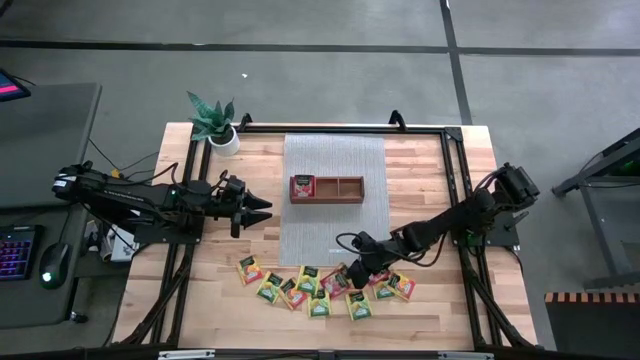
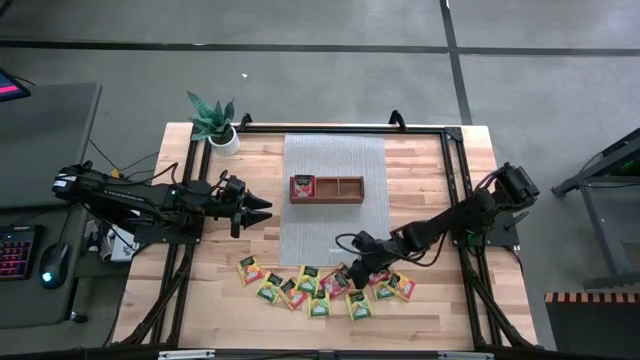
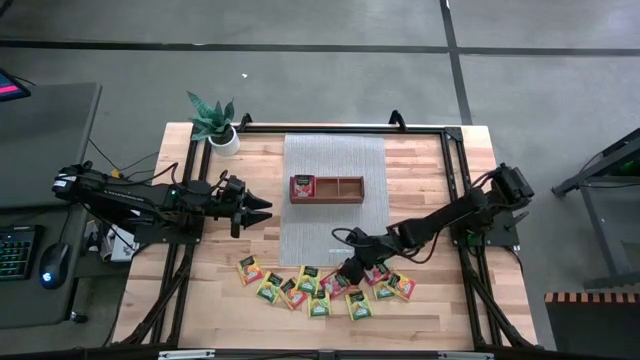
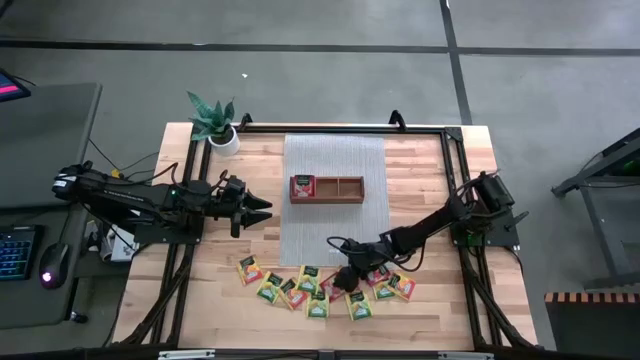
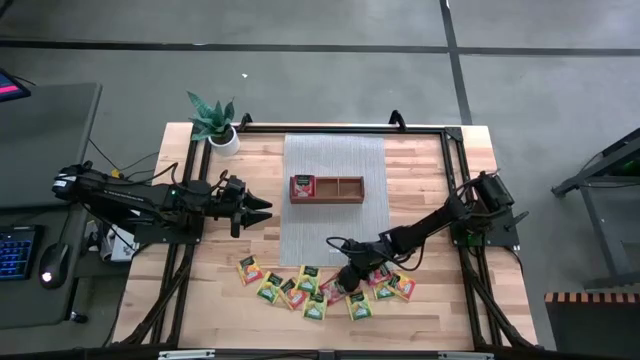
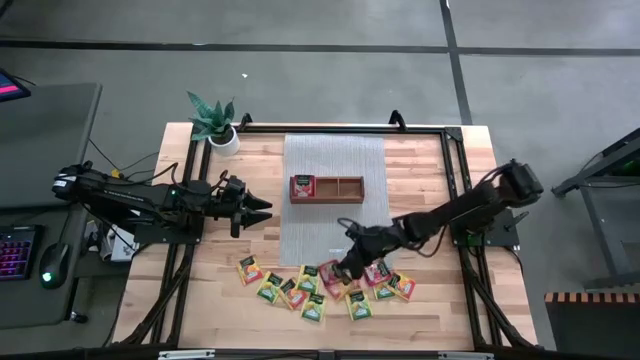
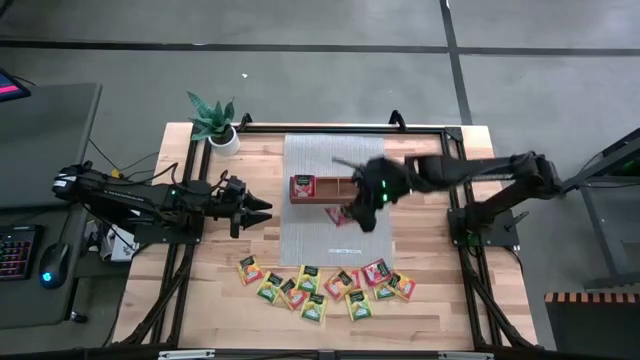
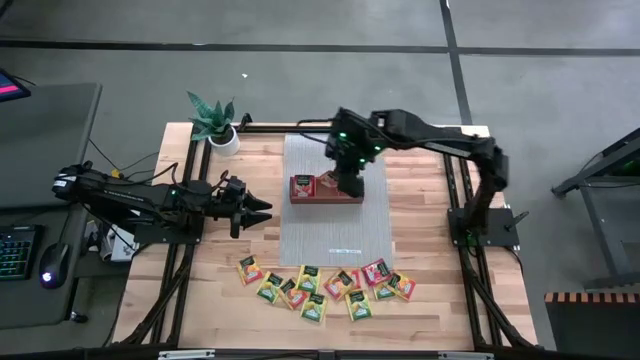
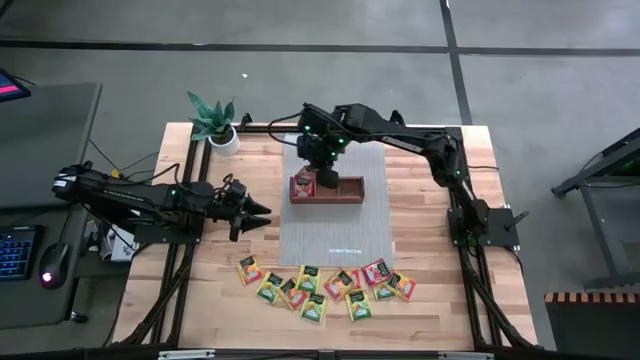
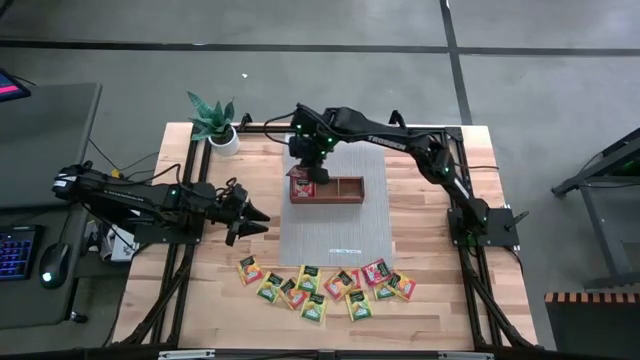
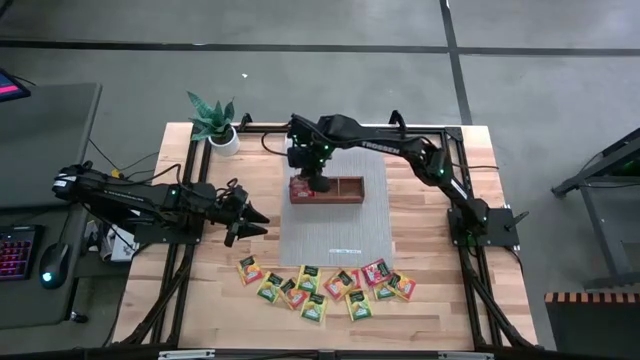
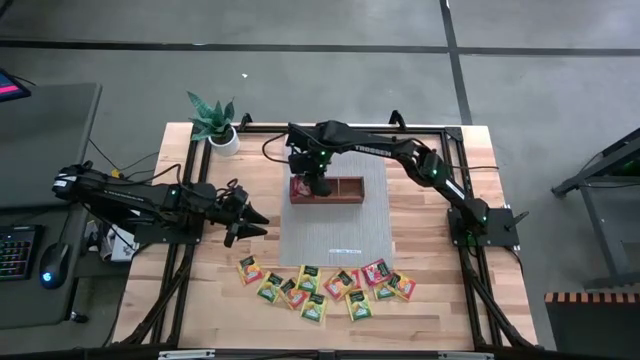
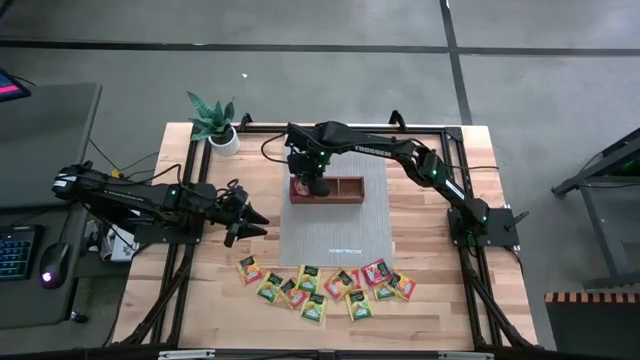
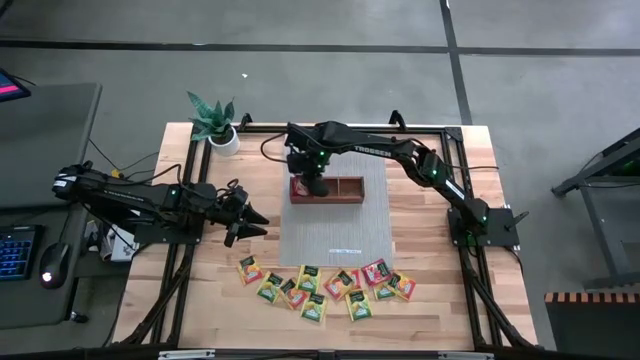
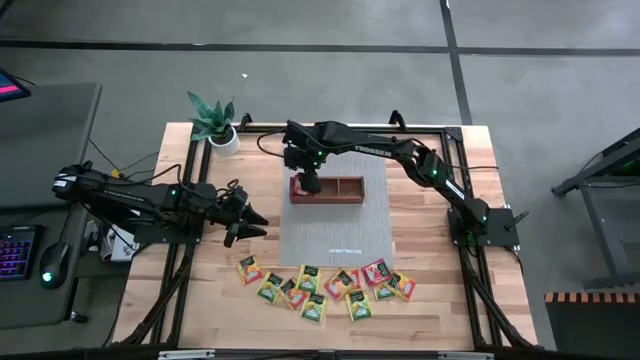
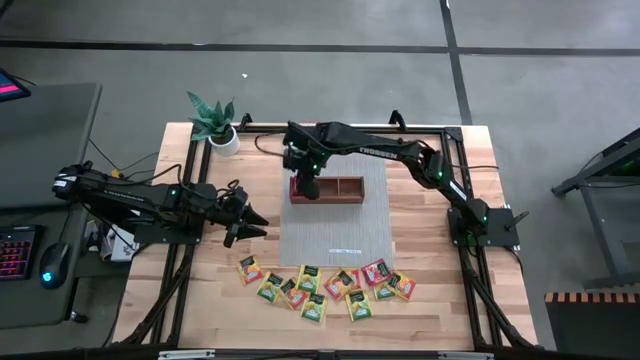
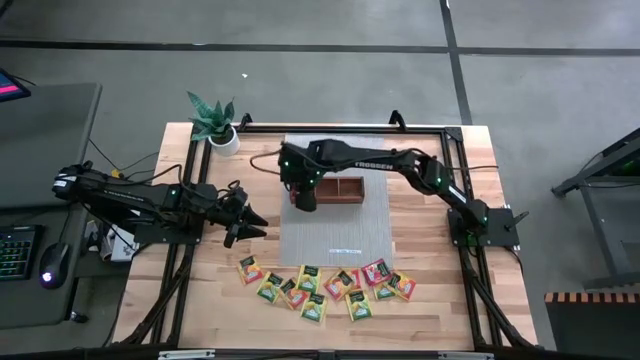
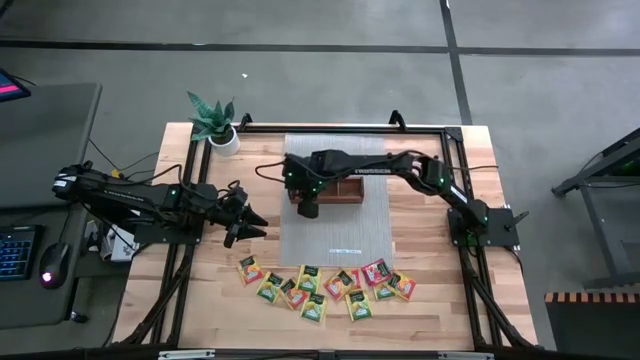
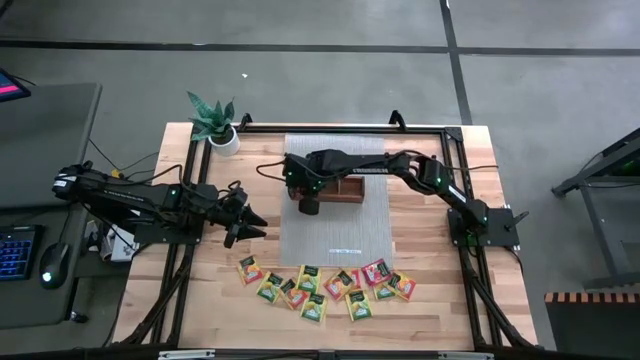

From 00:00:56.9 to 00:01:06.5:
Task: Pick & Place Tea
Put the red tea bag into the left section of the wooden organizer

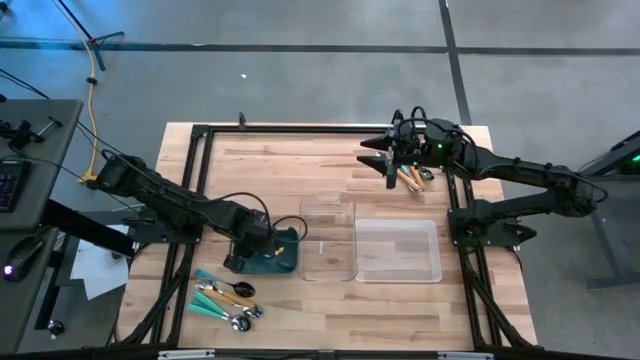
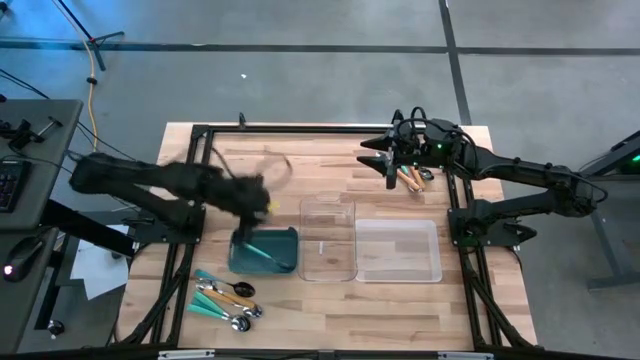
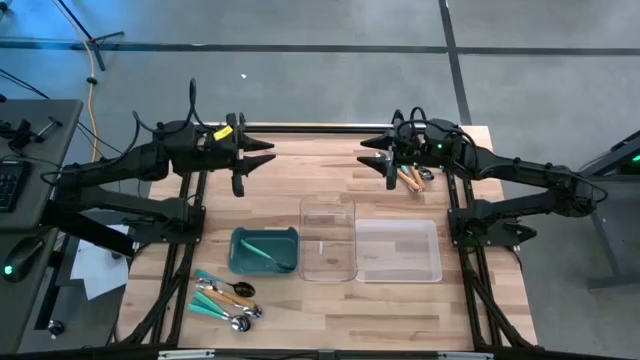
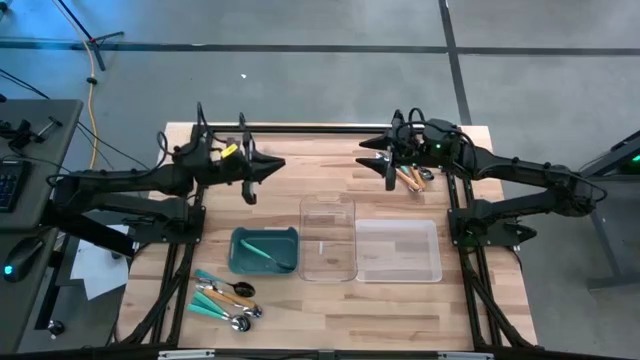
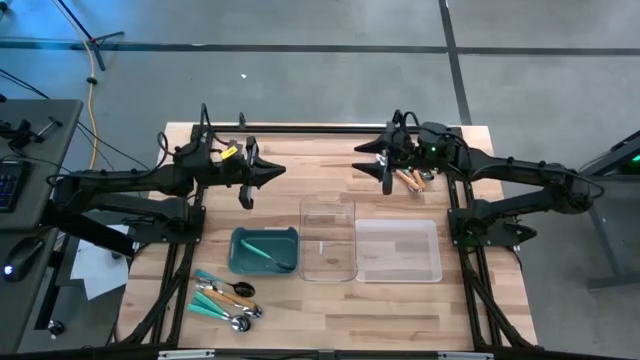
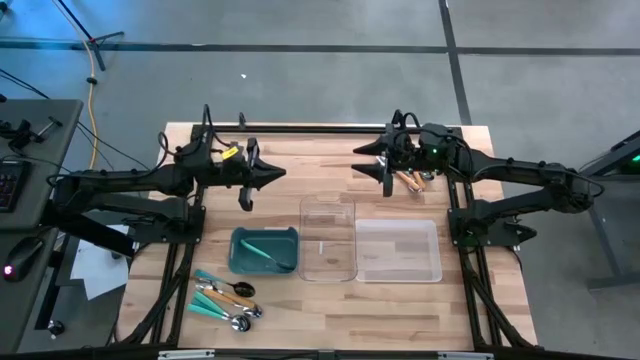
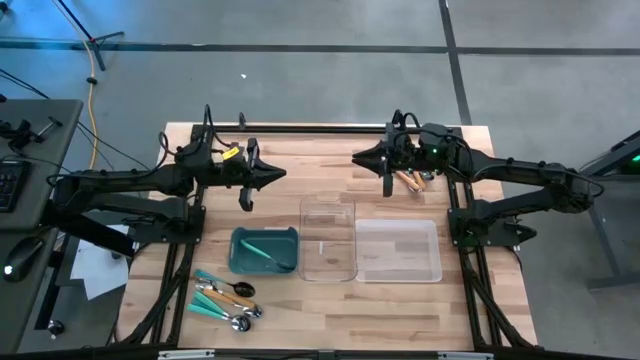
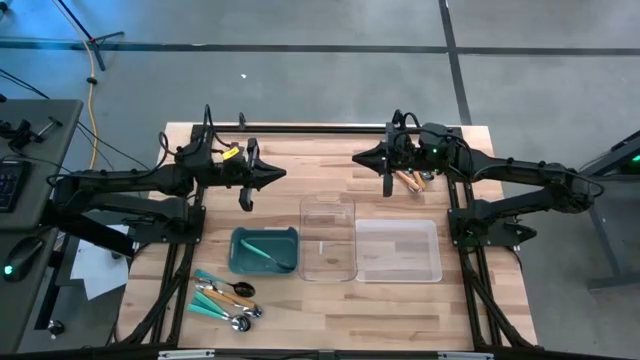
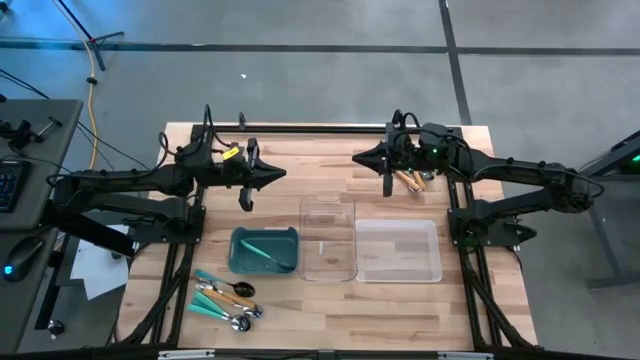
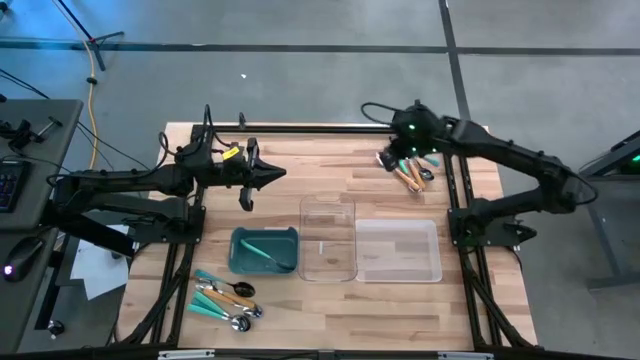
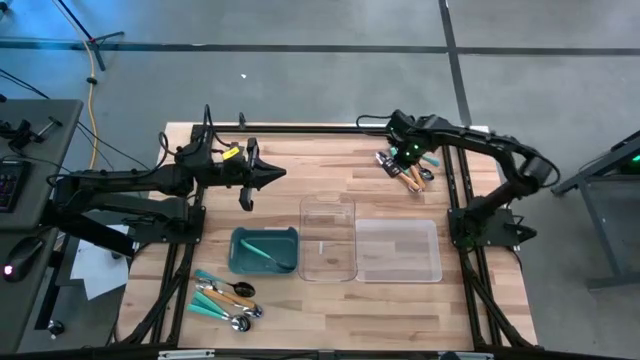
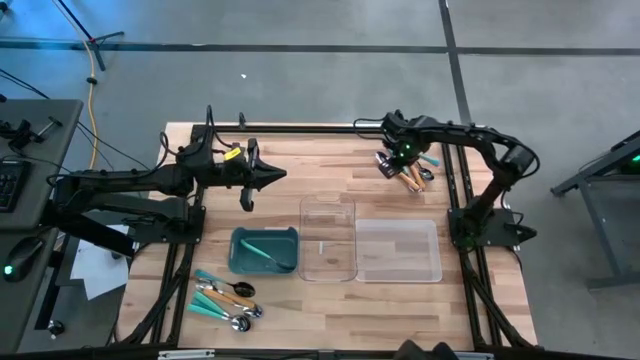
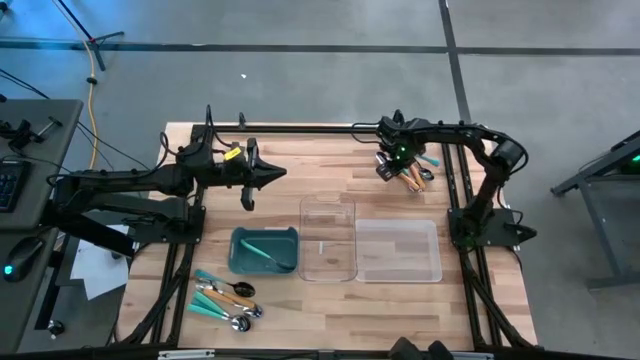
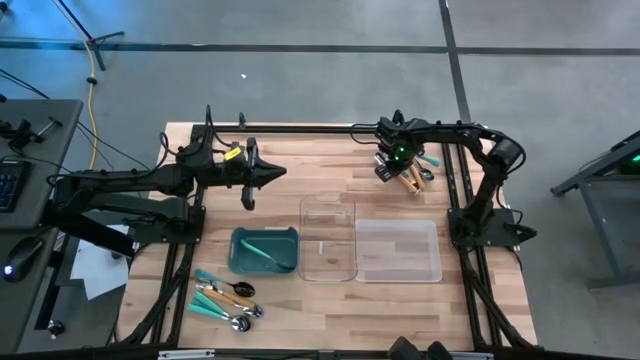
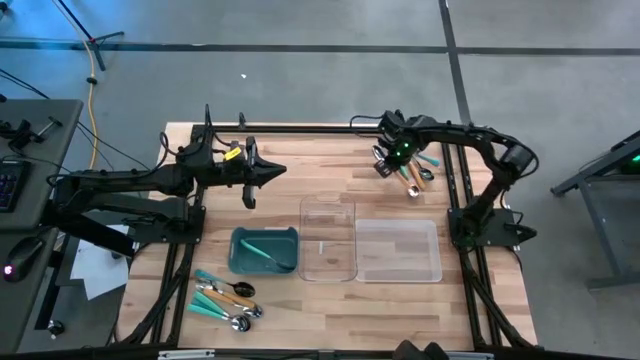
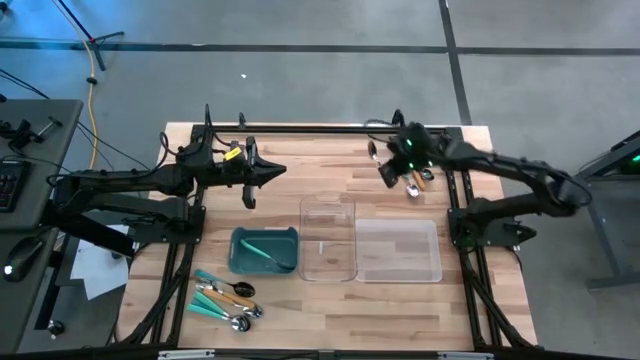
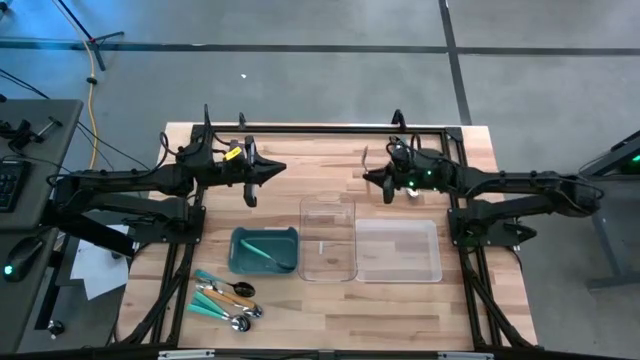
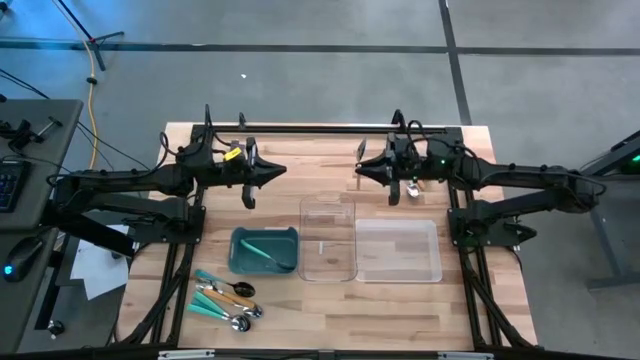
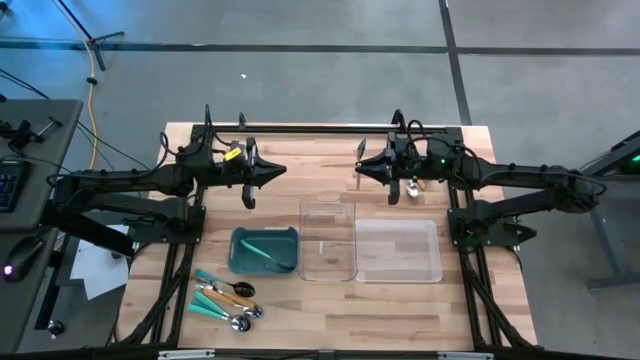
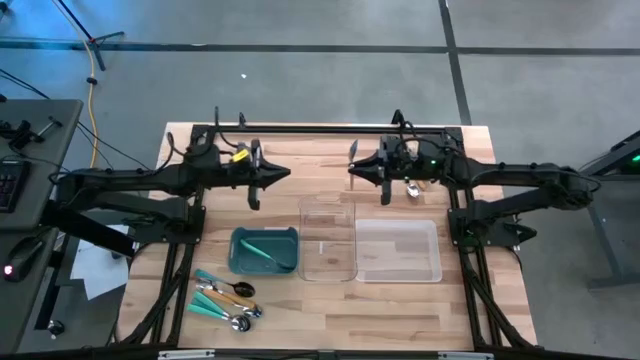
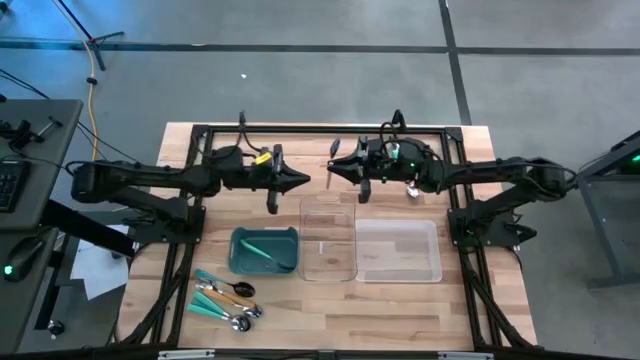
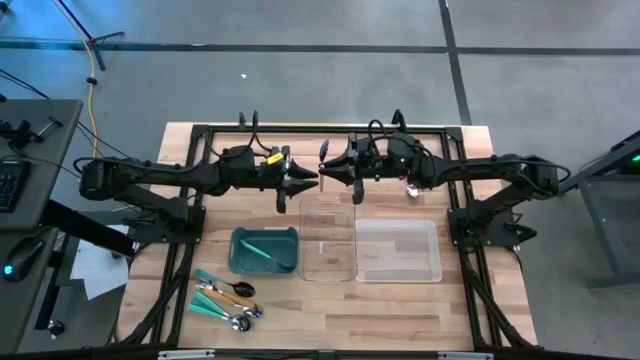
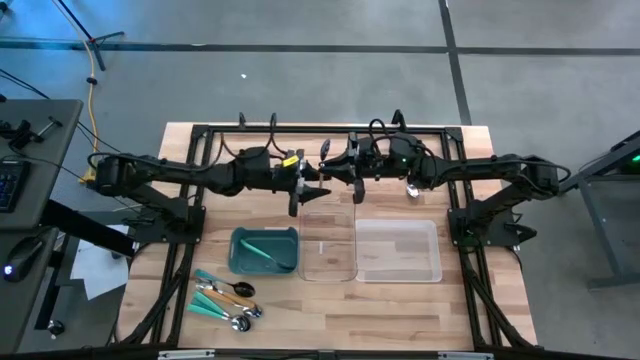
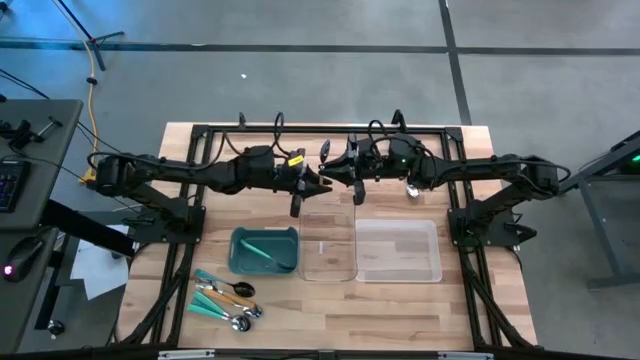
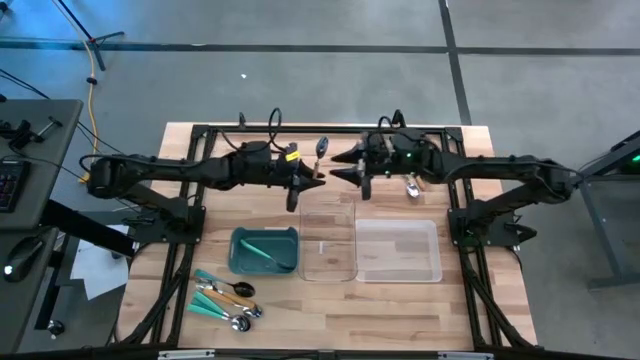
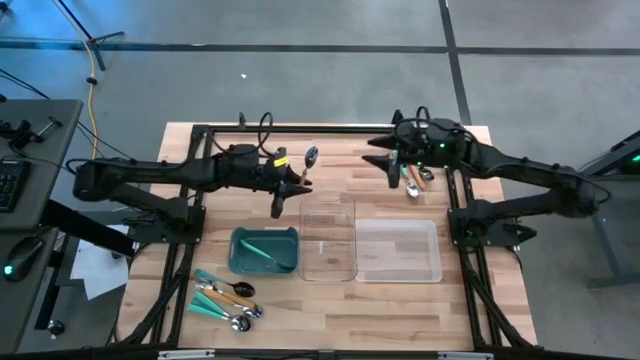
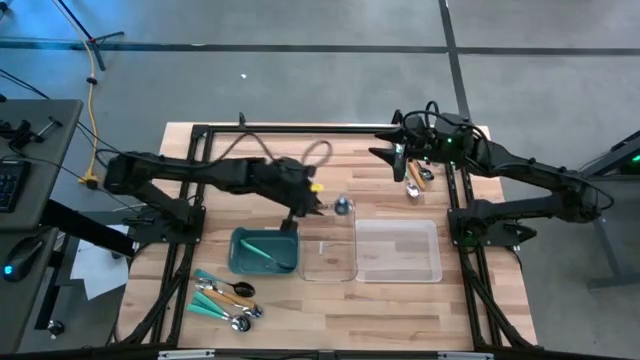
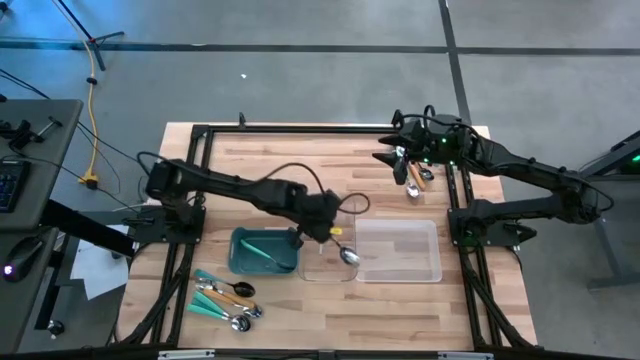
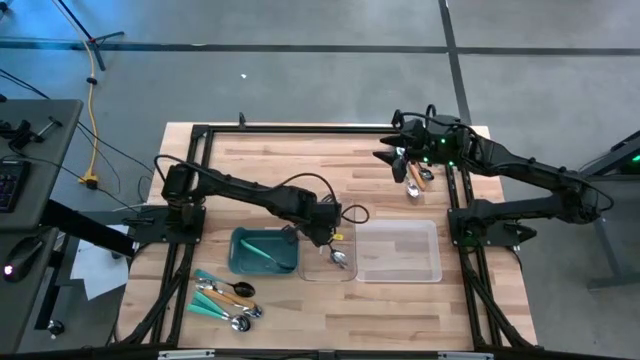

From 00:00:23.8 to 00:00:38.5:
Task: Sort silverware by color (type)
Put the orange spoon into the transparent bin
